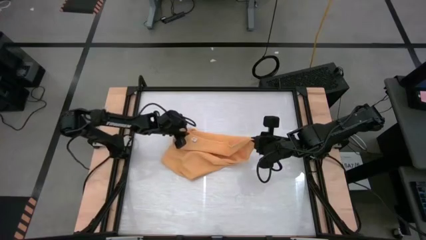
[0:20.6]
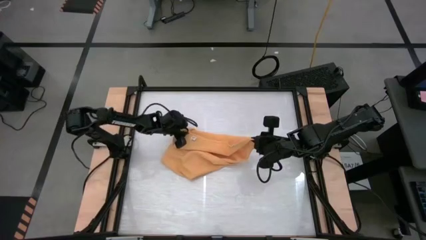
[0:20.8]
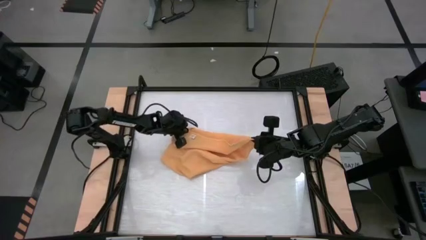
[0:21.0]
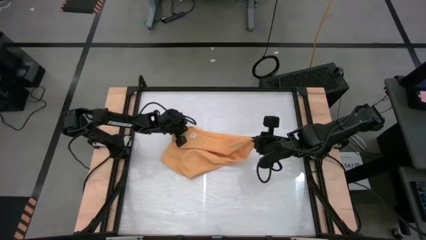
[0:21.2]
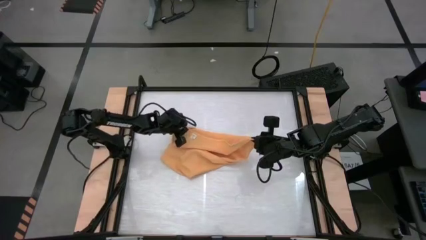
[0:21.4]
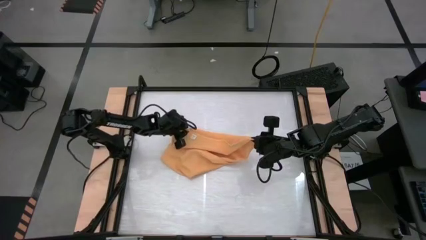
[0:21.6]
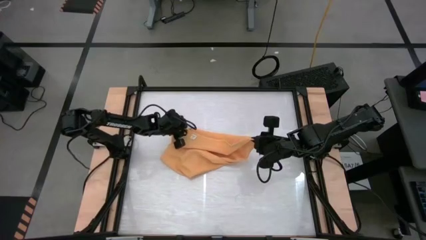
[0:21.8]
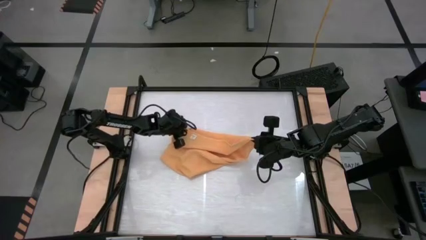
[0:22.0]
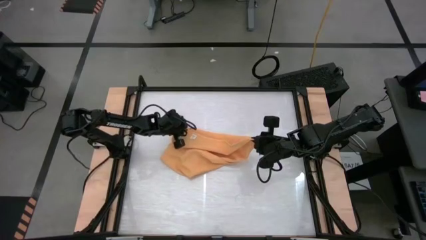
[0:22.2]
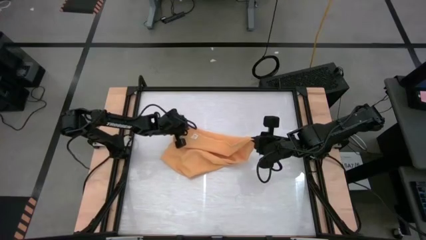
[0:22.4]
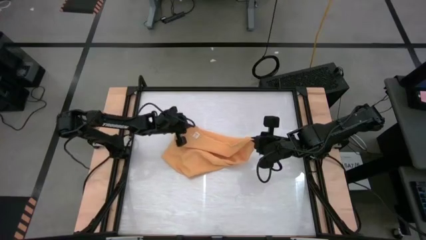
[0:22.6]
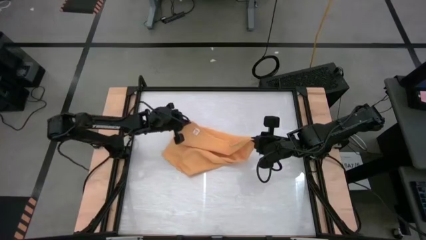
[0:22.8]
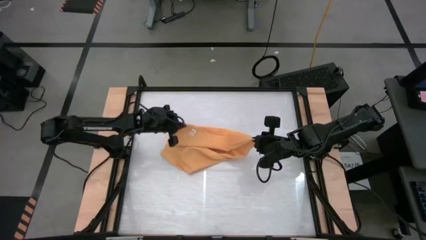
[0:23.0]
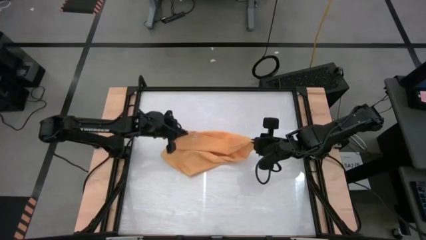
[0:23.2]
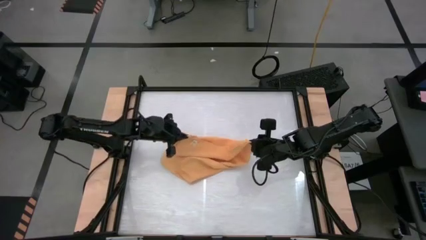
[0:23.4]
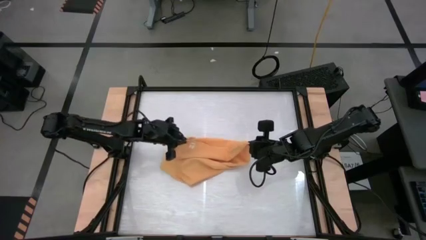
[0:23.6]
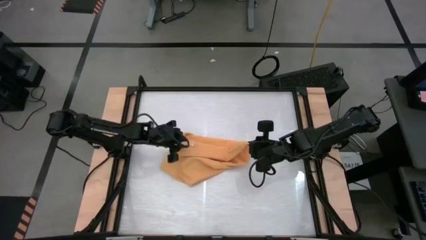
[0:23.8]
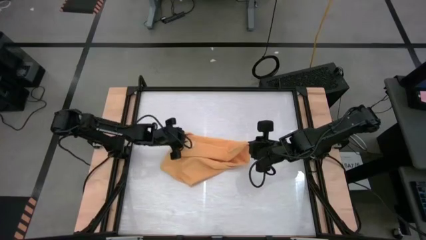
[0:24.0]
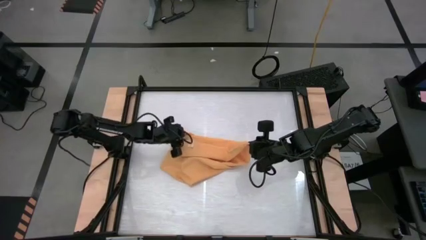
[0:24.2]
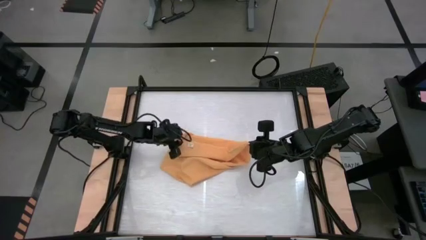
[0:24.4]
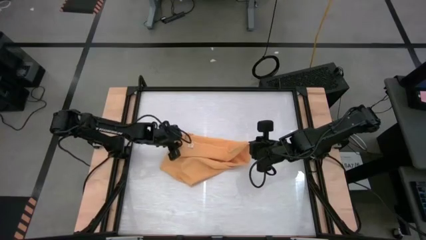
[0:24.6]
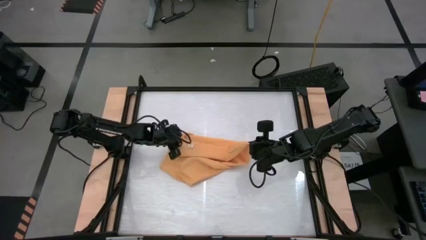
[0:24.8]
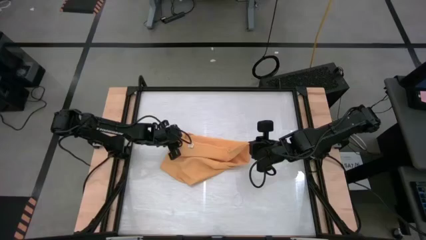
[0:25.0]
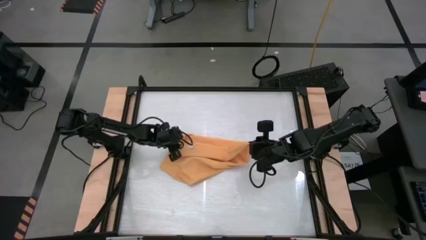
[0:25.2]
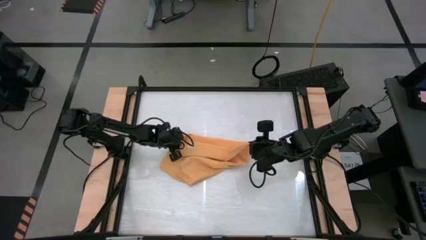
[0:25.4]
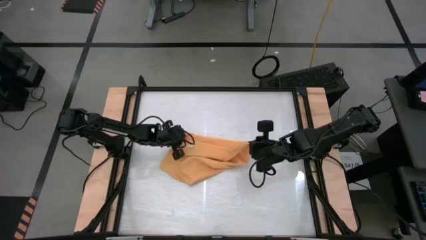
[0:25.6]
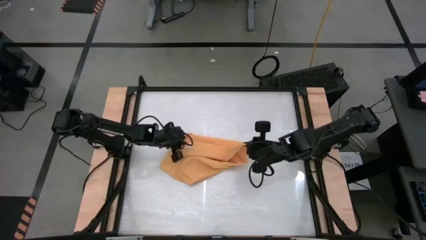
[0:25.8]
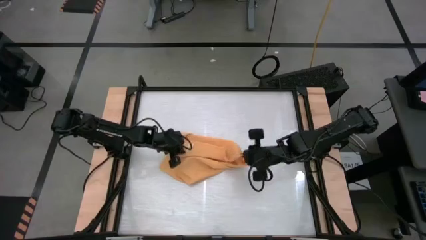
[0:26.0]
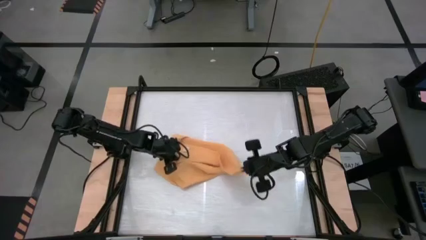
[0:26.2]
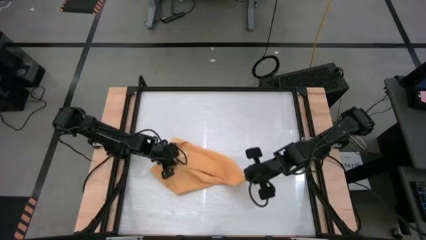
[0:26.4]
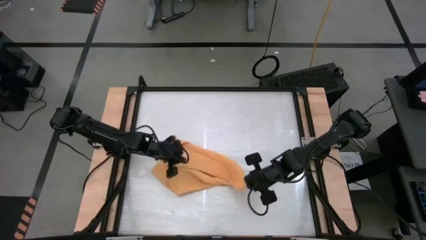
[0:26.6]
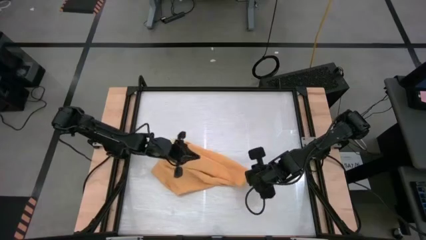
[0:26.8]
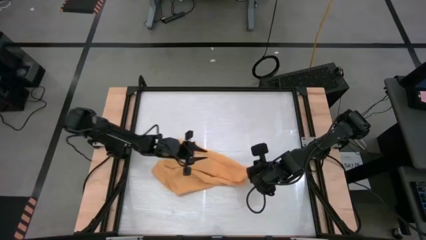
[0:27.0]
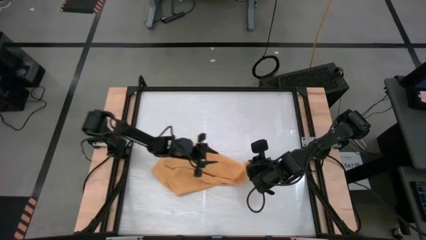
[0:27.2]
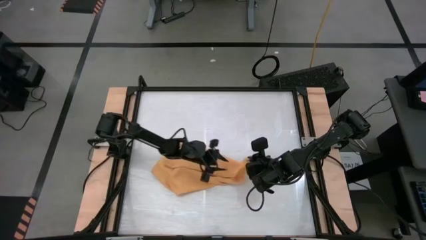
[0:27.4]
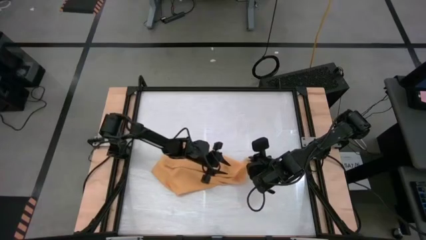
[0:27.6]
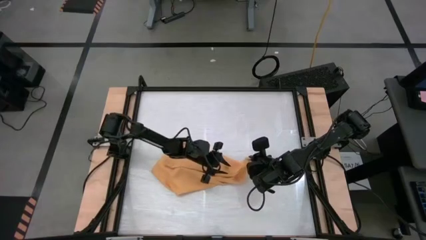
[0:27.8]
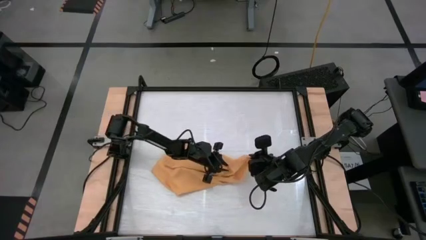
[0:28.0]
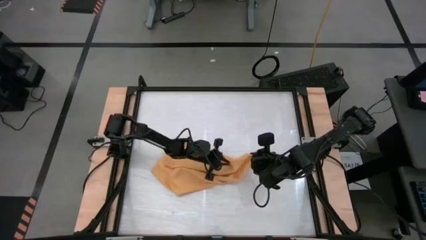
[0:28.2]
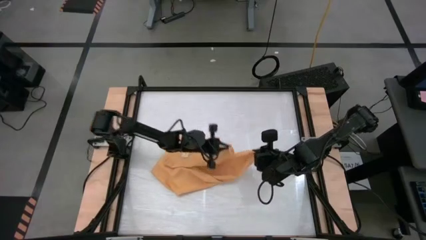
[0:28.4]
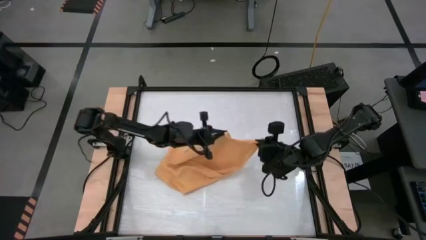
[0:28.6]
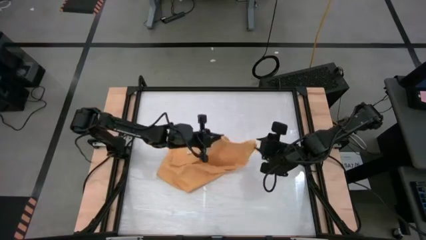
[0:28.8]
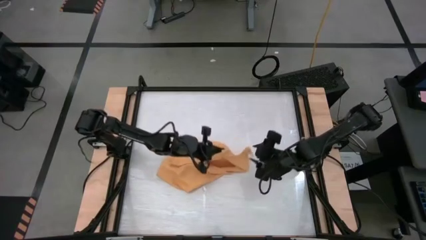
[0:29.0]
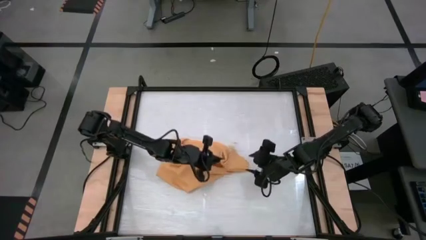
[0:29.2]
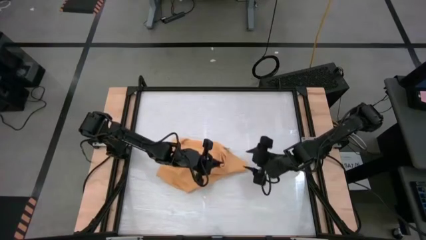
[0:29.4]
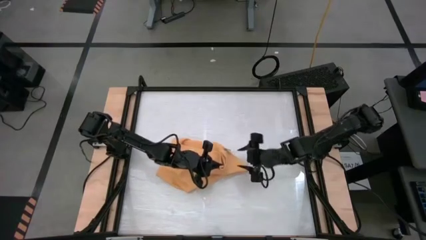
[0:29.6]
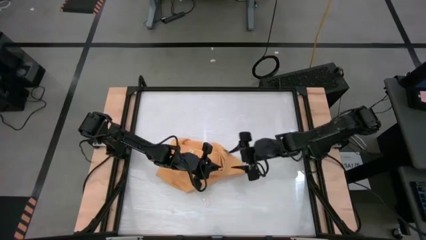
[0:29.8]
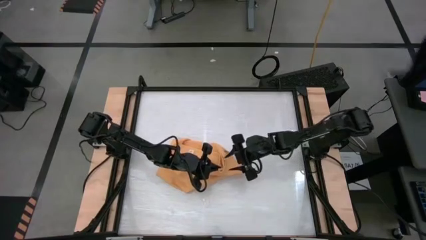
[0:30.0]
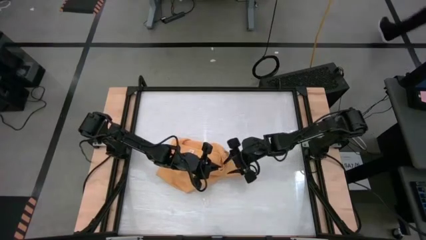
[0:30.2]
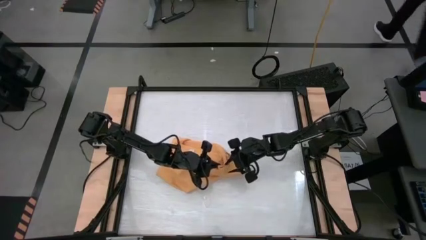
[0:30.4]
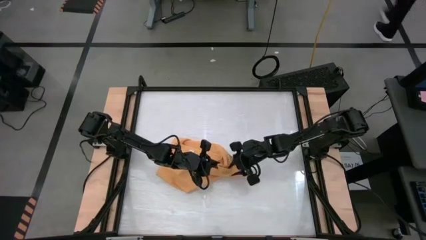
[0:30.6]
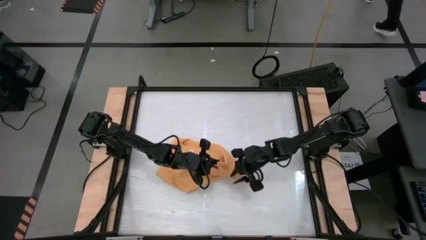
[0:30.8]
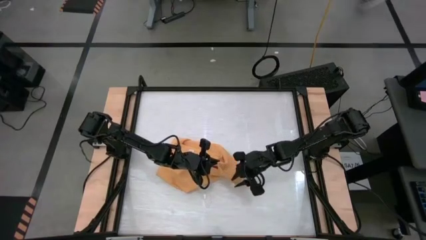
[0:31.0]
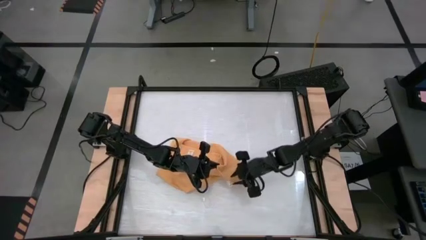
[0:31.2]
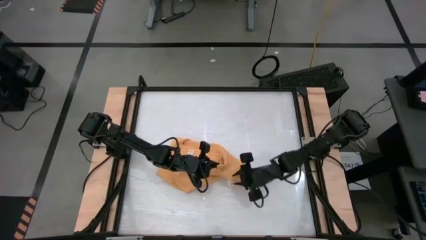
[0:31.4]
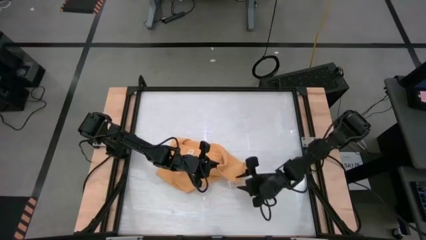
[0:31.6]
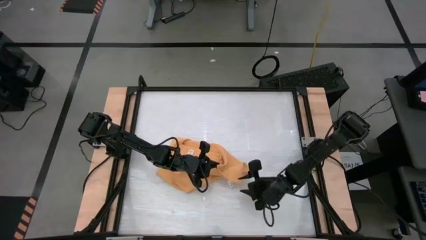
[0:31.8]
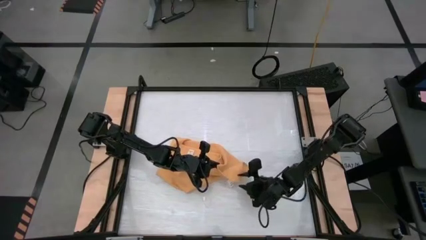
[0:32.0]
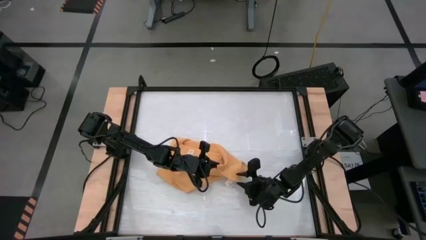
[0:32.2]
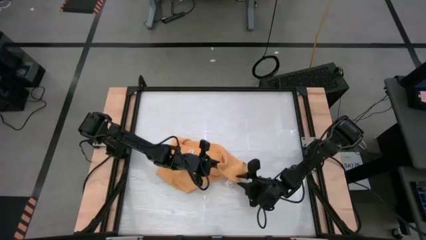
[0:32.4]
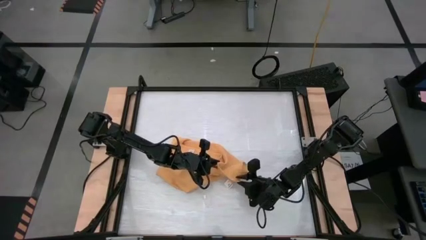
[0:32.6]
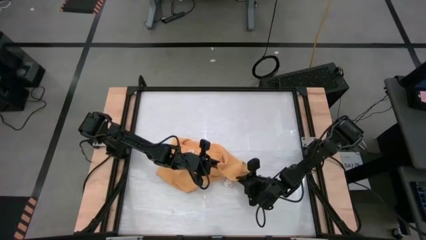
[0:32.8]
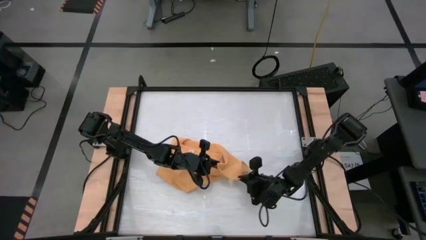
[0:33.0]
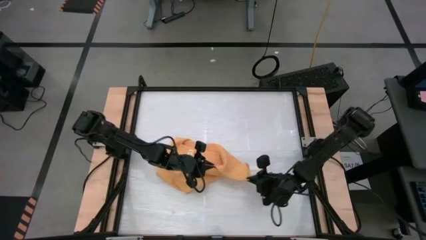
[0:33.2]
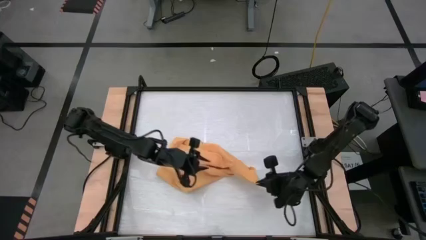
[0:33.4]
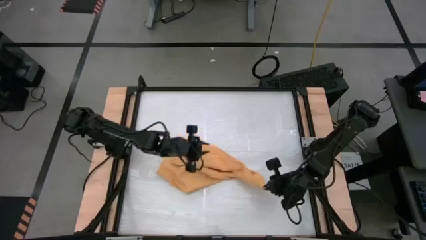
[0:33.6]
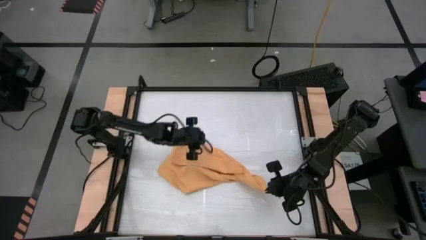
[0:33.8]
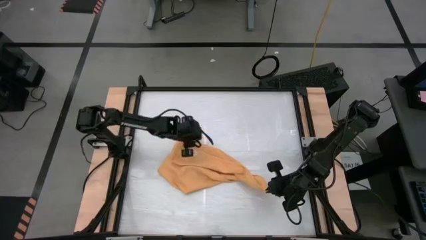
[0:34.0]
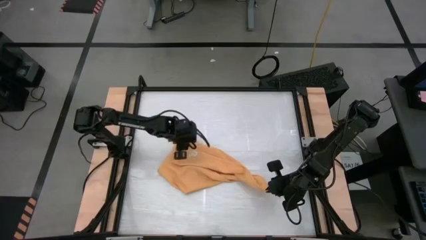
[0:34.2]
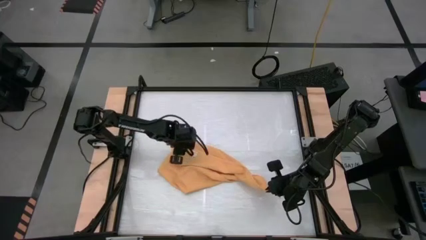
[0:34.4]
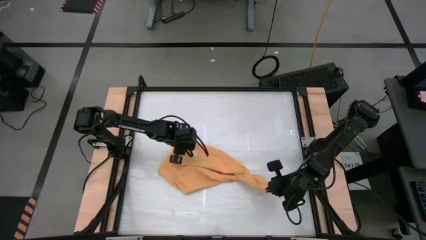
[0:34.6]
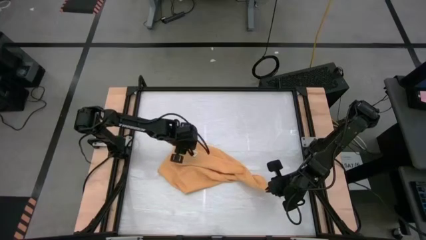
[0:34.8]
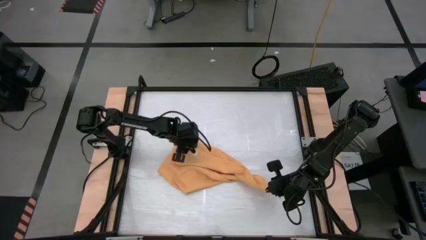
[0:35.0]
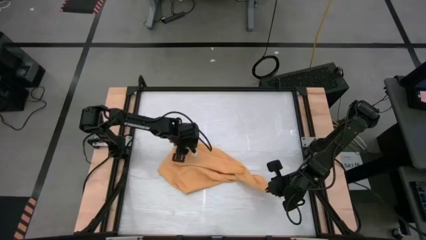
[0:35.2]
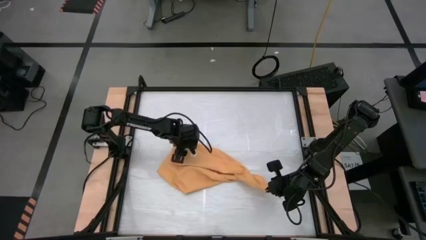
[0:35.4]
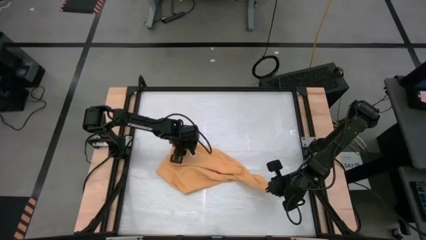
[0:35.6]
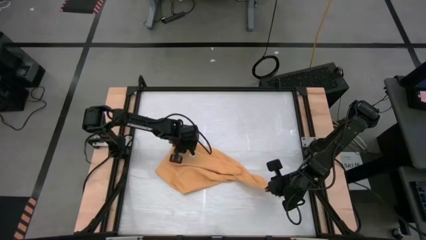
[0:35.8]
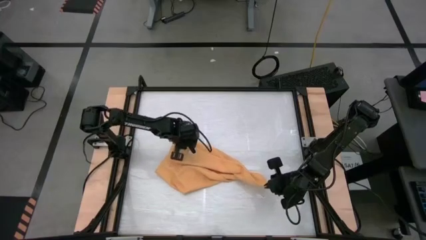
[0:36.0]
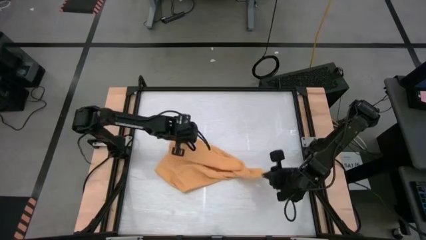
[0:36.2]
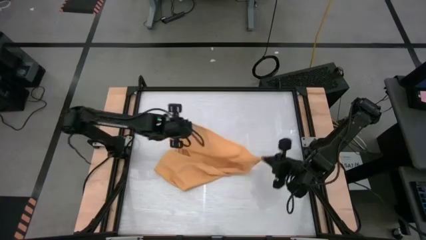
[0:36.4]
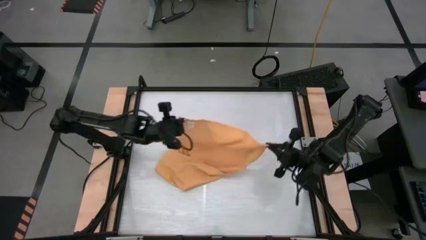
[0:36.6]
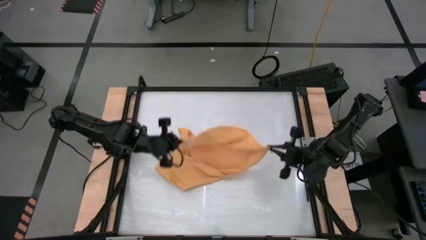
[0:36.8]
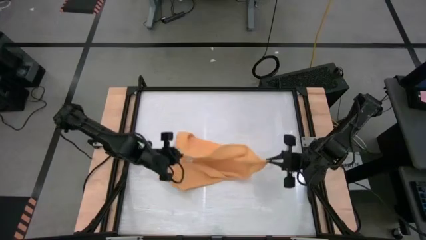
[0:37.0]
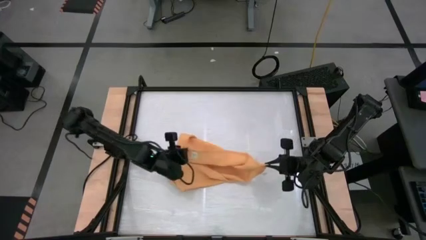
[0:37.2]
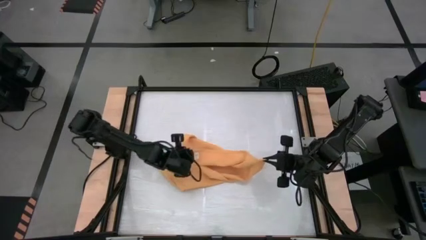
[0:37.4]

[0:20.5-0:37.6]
Task: Roll towel into tight, uniform cylinder
Roll the yellow towel
